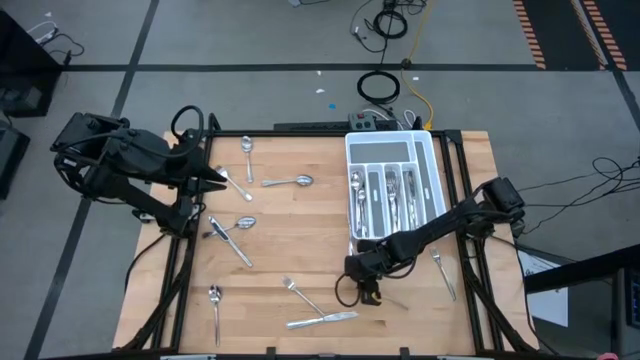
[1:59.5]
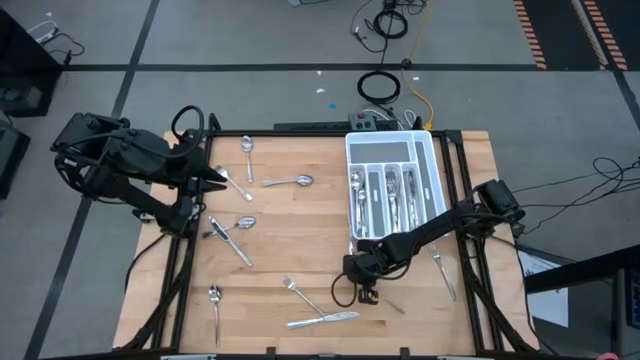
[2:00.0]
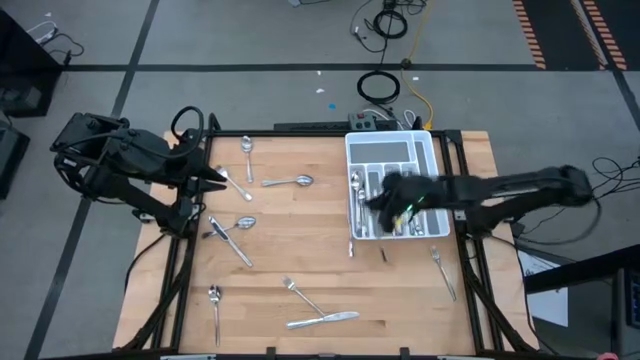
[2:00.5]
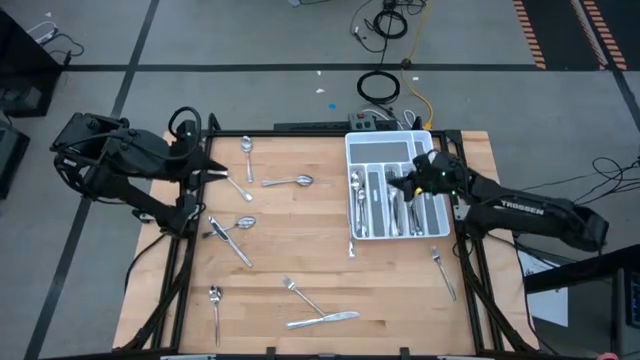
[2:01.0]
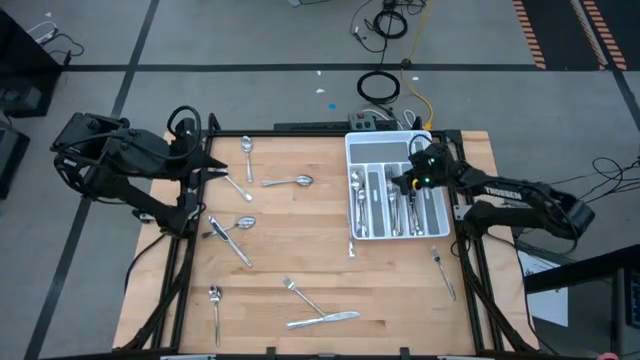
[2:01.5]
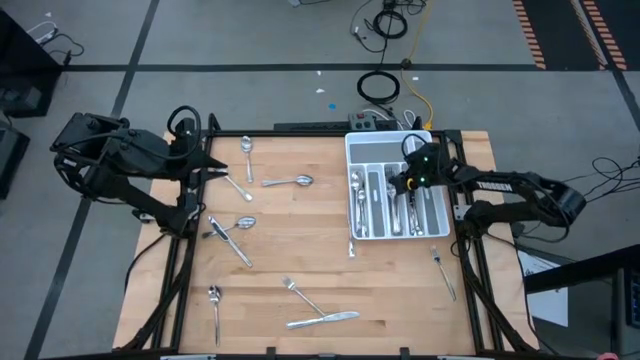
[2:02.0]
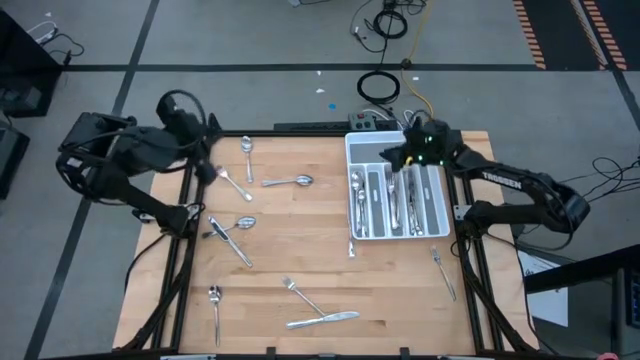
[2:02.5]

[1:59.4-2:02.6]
Task: Sort silverware
Put the silver fork into the white silverware tray

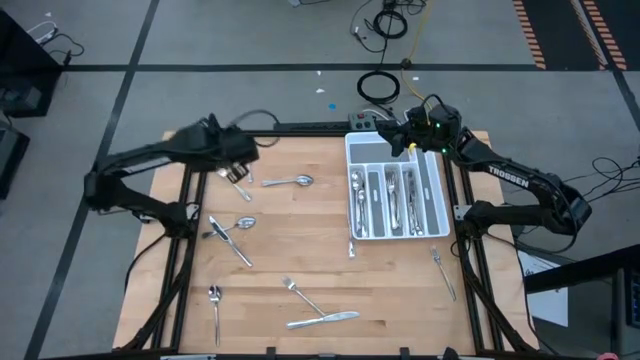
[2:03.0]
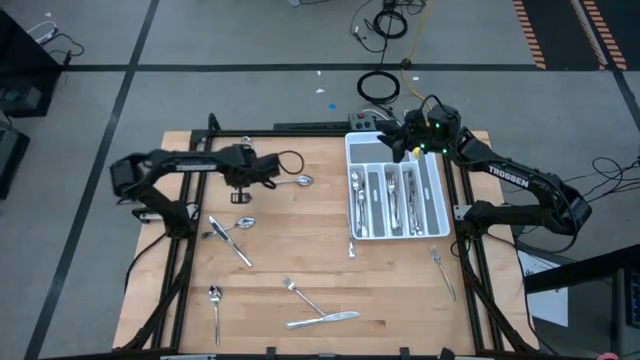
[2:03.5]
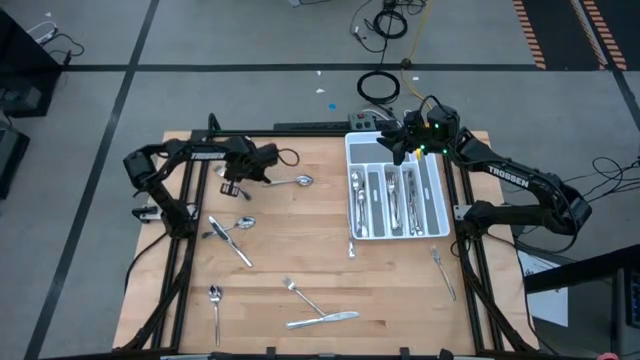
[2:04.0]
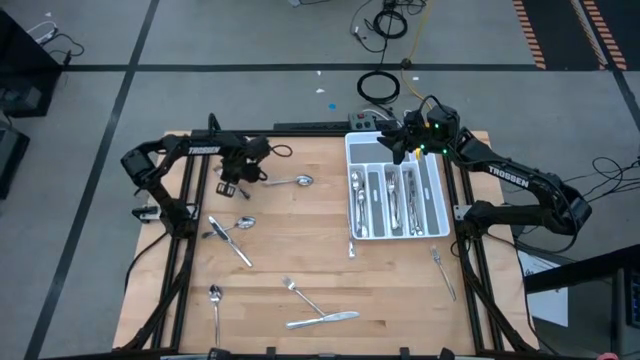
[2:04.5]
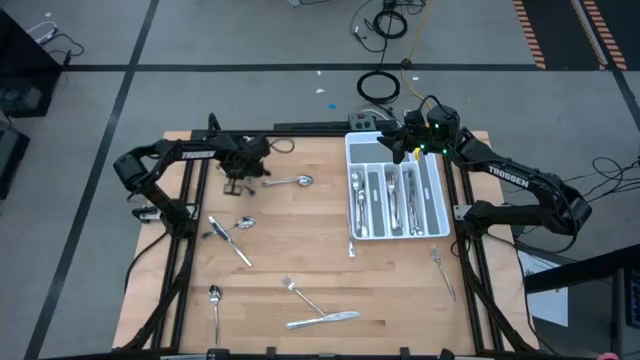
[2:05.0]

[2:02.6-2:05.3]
Put the silver fork into the white silverware tray

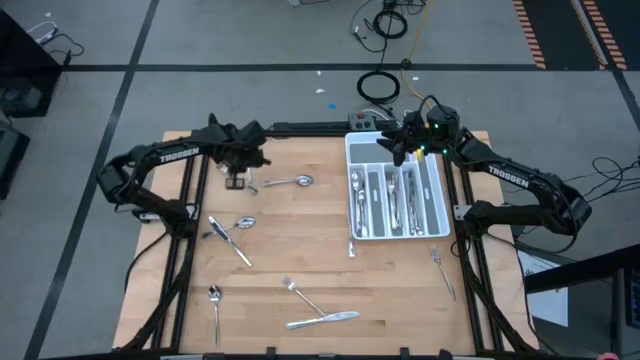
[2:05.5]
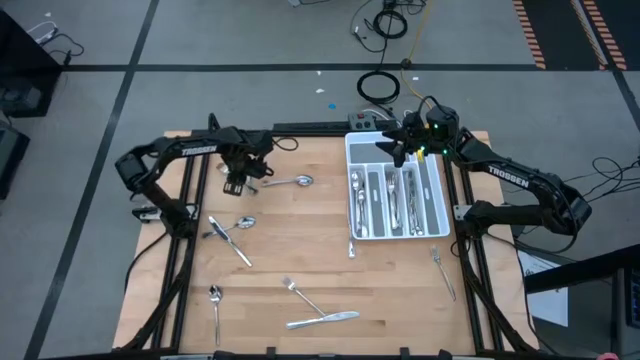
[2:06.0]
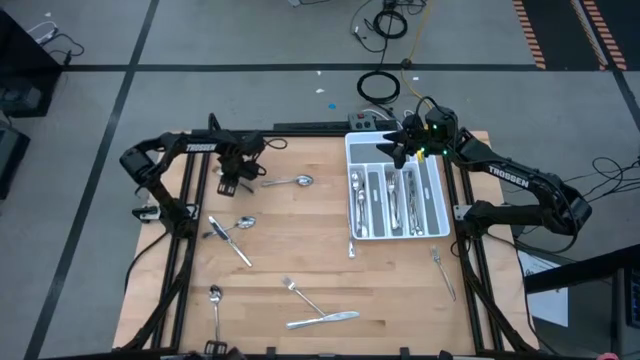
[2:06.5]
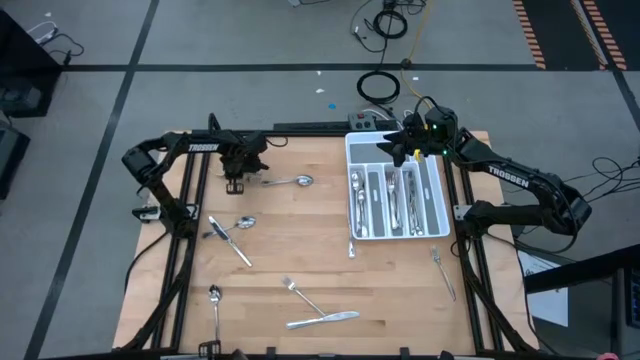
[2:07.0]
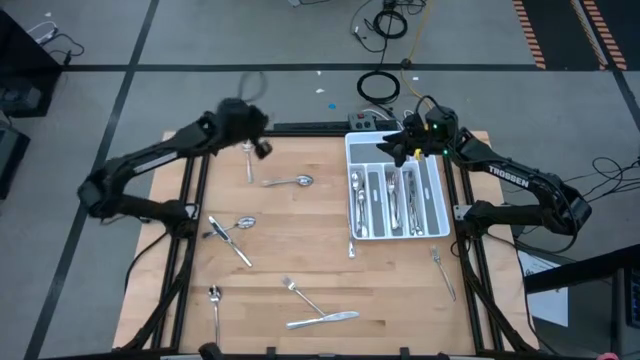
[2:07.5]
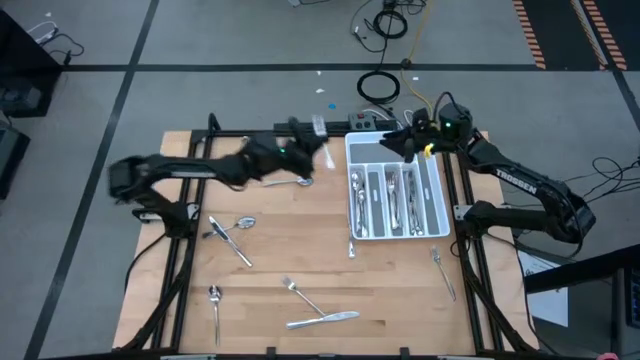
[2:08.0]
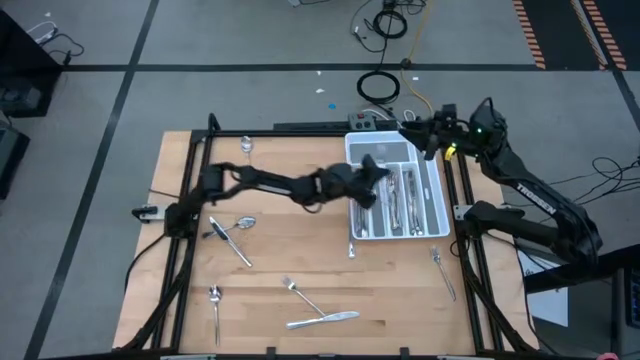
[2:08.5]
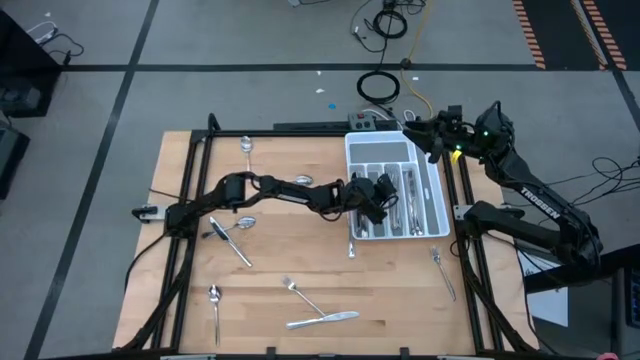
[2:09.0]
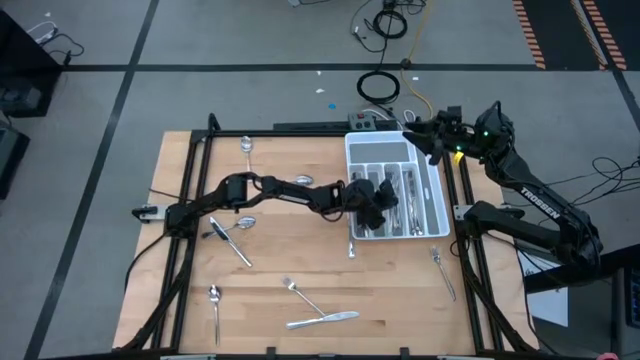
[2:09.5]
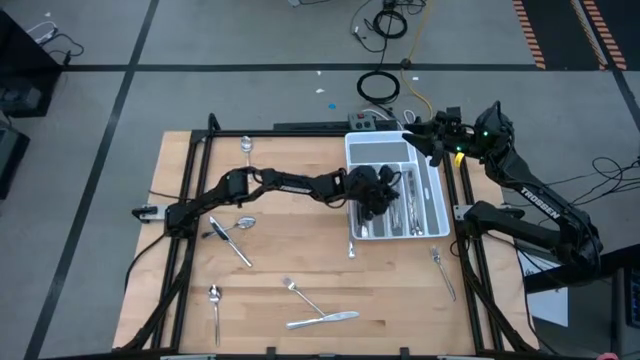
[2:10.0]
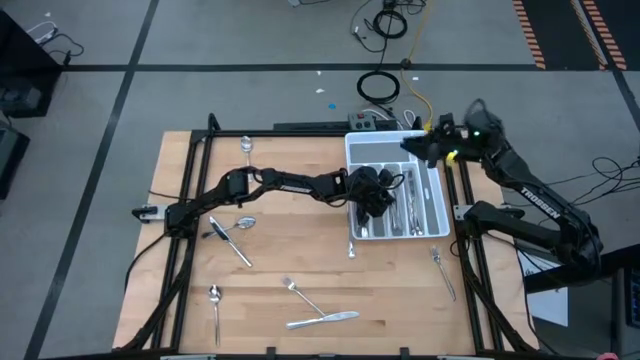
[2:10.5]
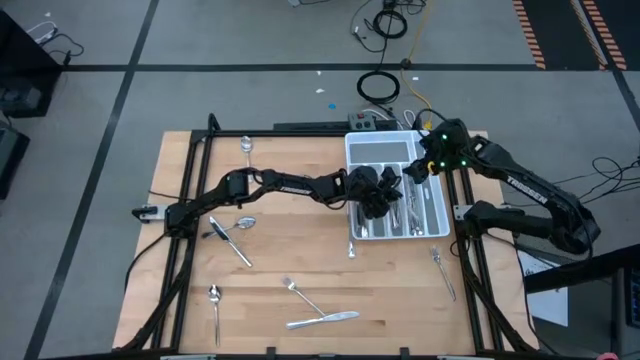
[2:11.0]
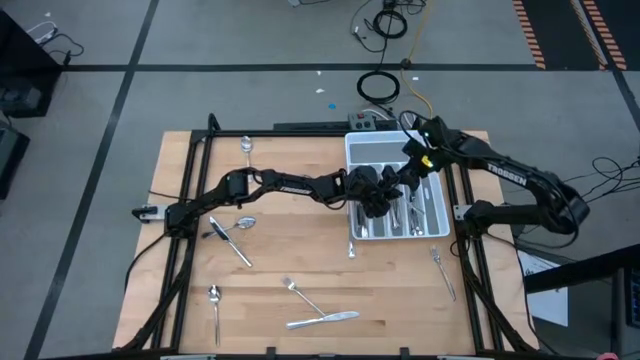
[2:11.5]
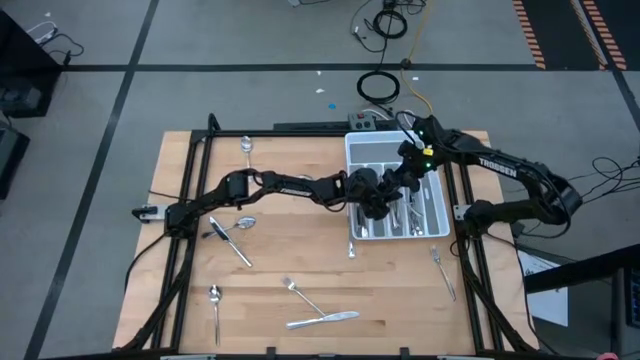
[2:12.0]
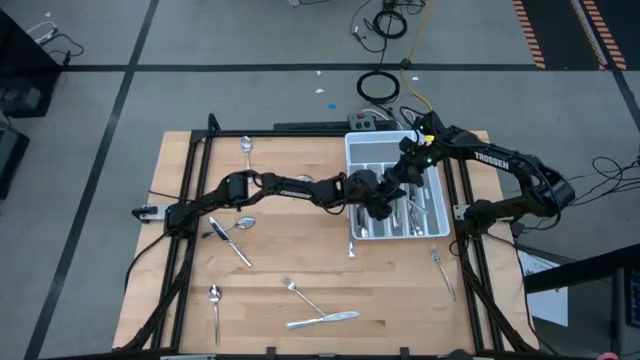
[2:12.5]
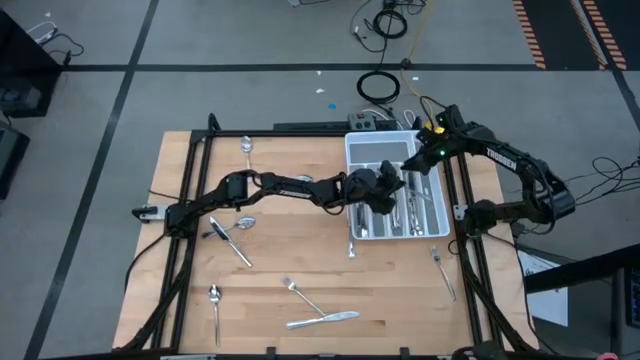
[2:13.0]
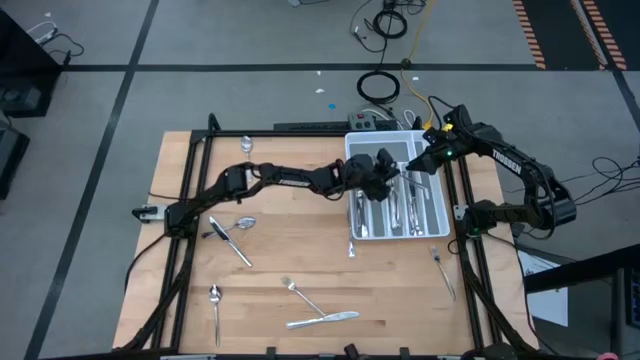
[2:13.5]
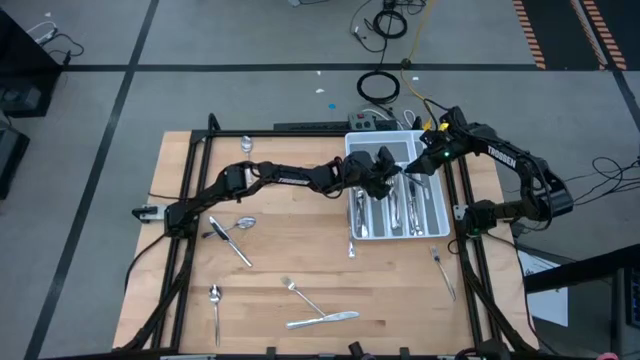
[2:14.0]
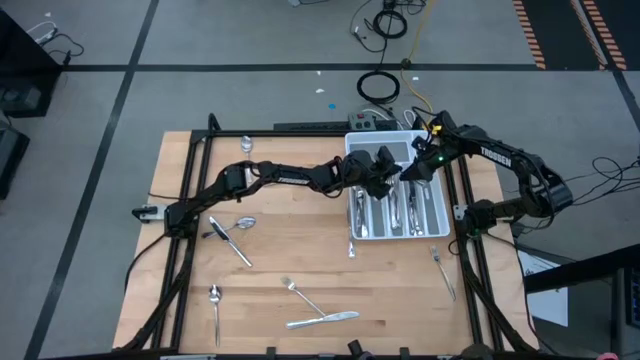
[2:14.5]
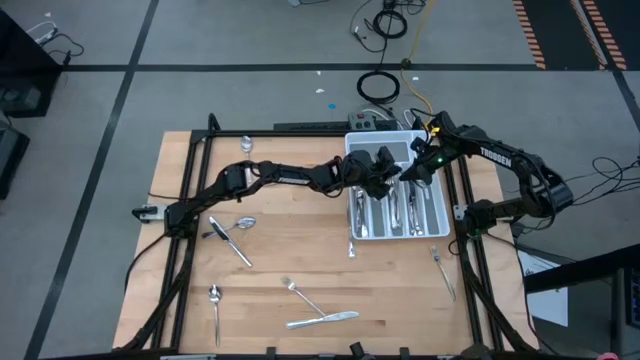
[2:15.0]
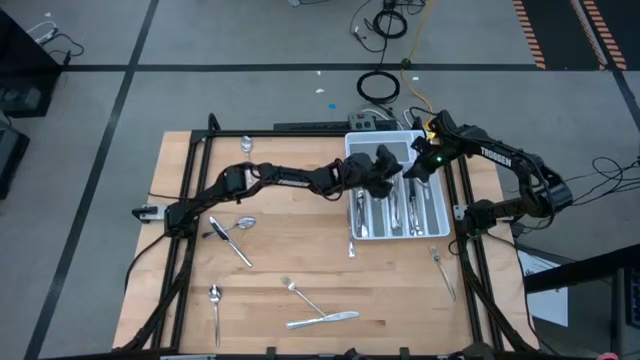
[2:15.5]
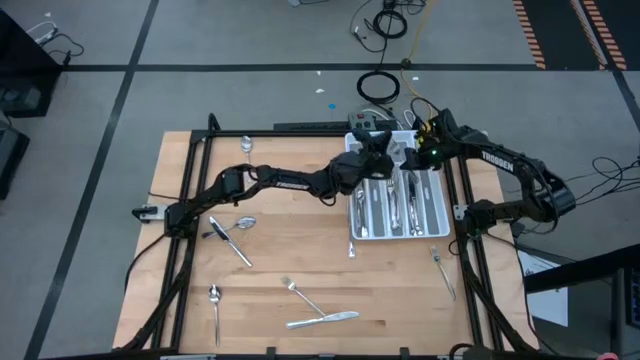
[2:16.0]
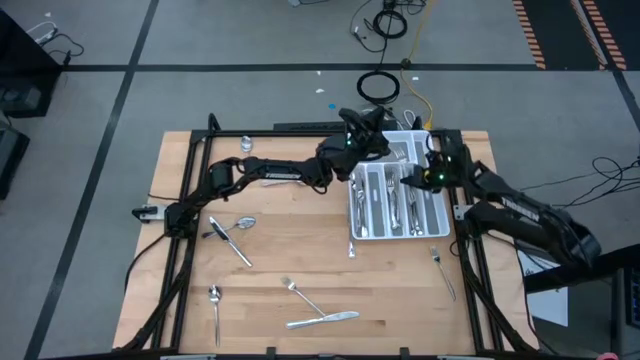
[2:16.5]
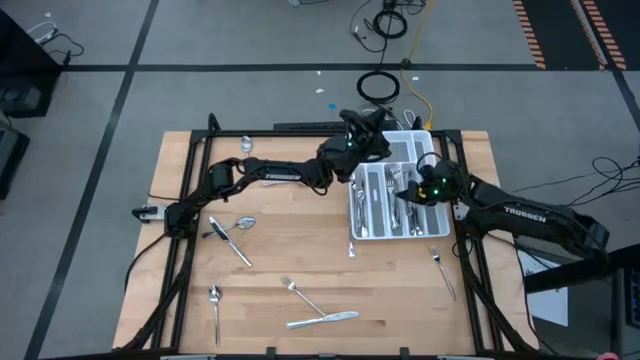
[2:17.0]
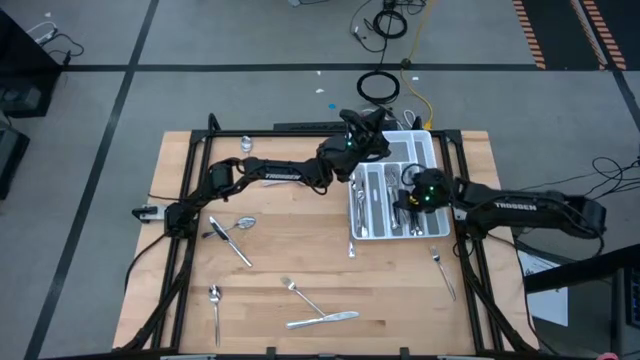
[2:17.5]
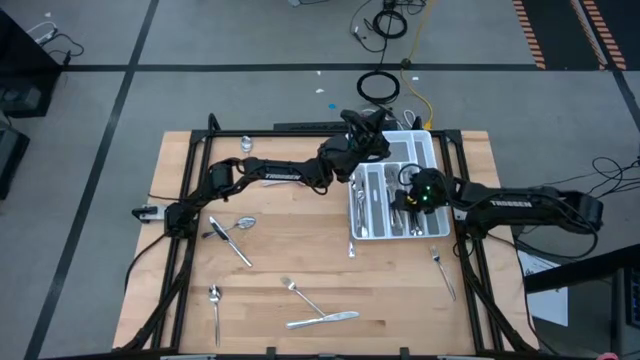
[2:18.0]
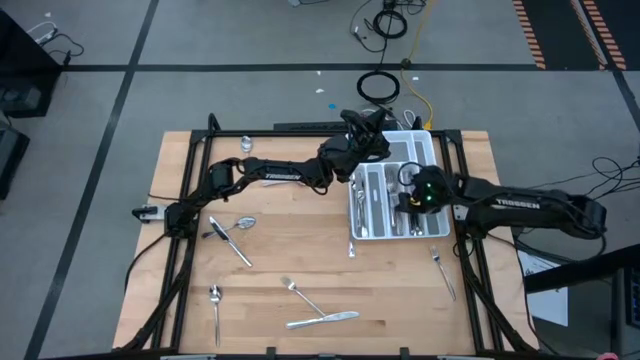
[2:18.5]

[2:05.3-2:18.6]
Put the silver fork into the white silverware tray

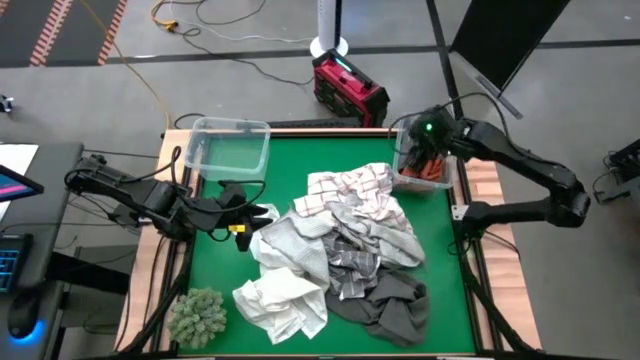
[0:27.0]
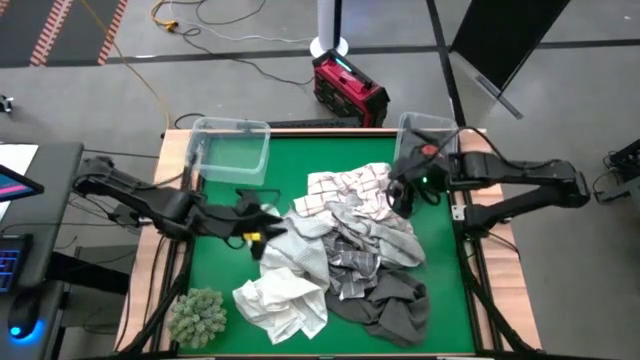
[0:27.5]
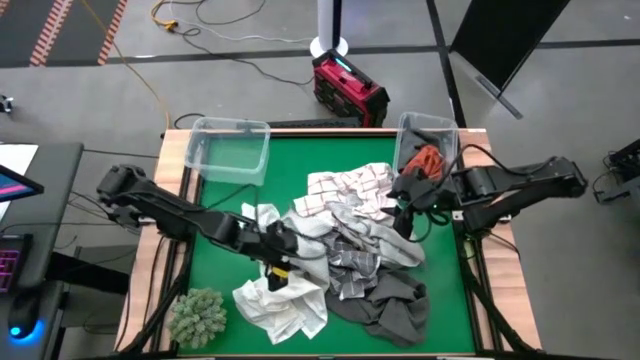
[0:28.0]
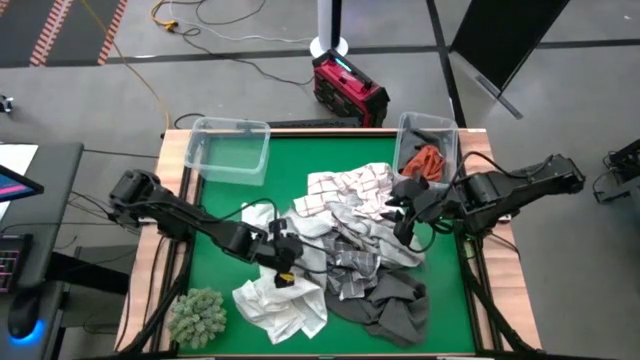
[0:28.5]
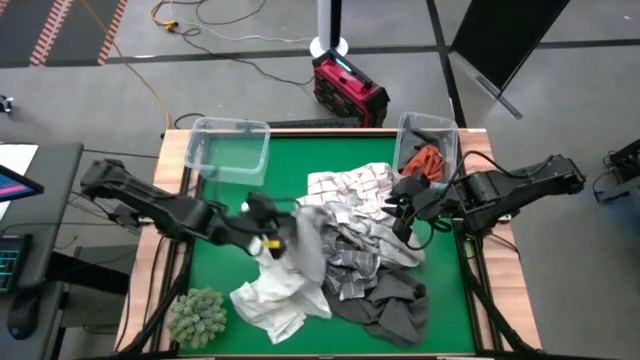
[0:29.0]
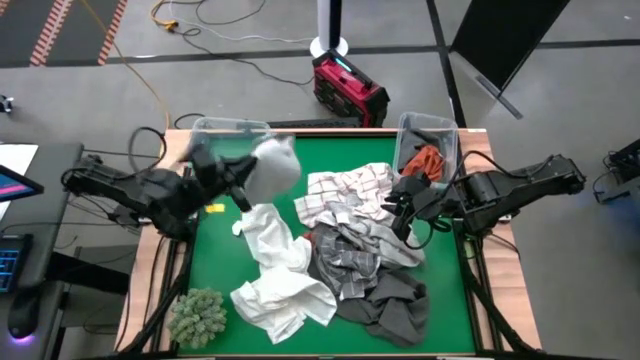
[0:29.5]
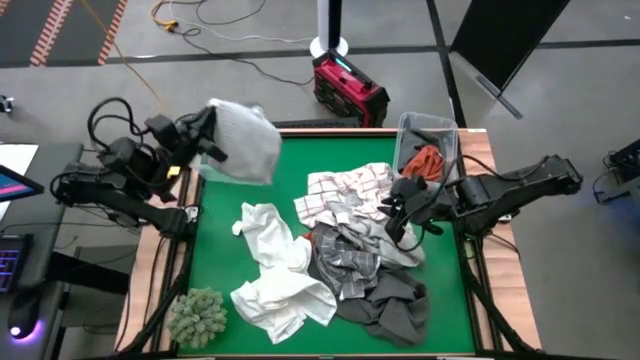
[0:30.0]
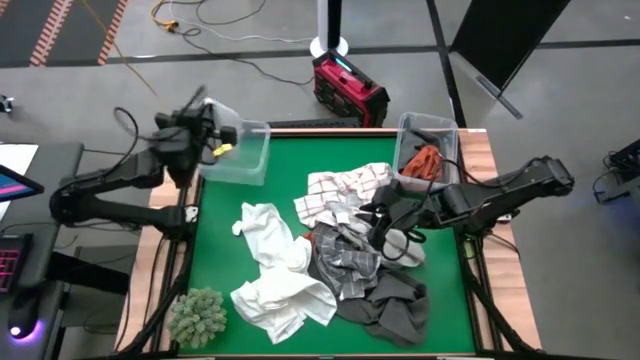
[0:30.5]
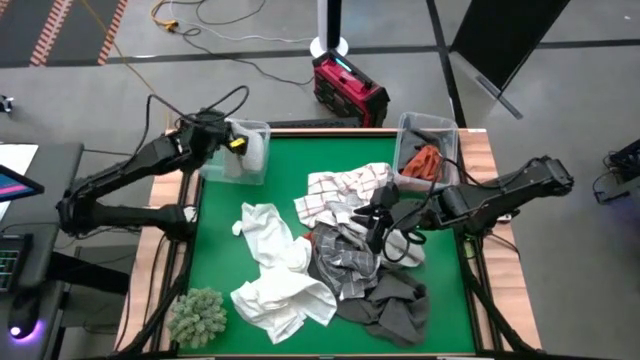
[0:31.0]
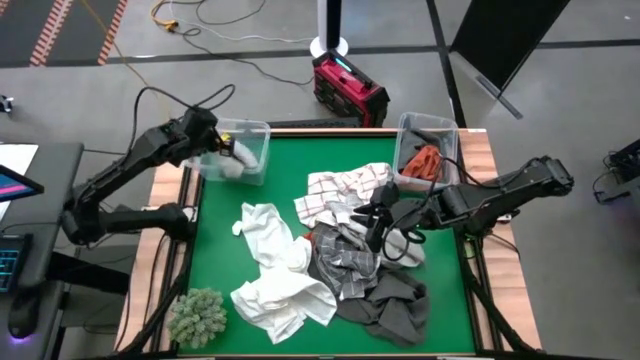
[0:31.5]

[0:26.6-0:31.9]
Task: Sort towels by color in basket
Put the light gray towel into the left transparent bin
